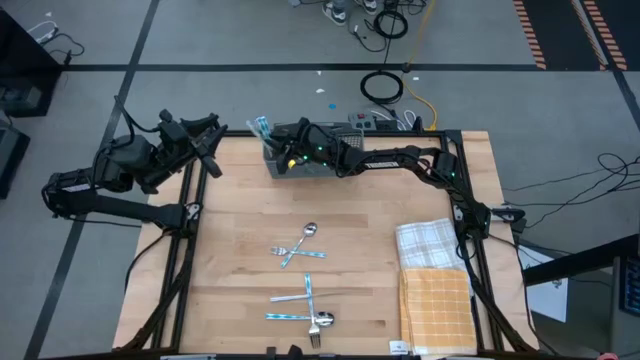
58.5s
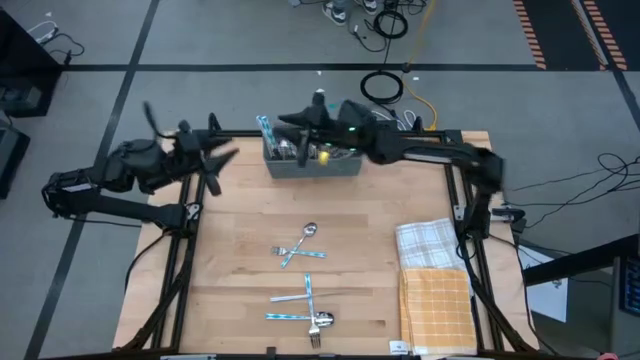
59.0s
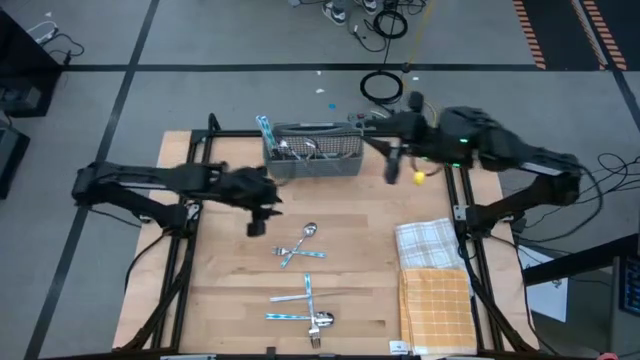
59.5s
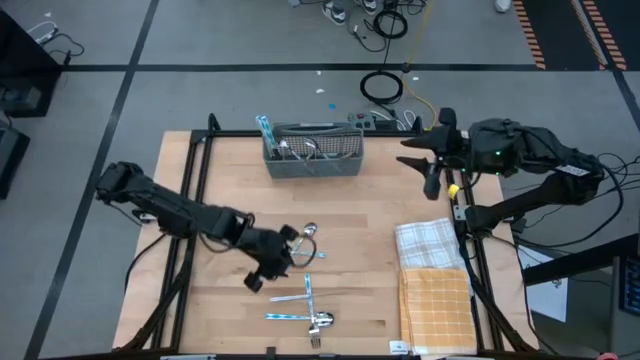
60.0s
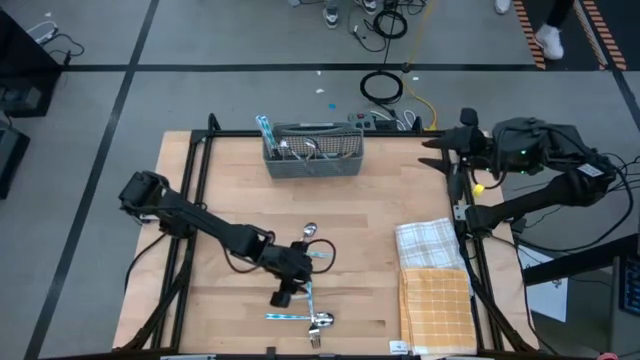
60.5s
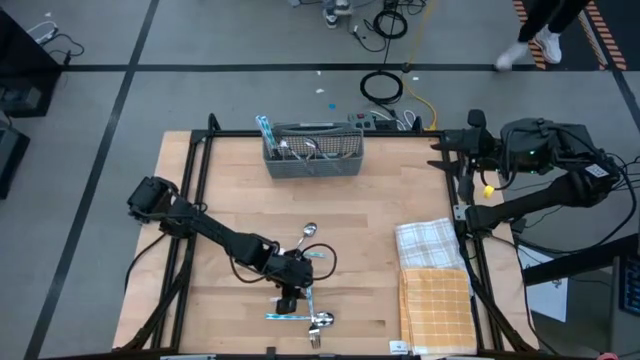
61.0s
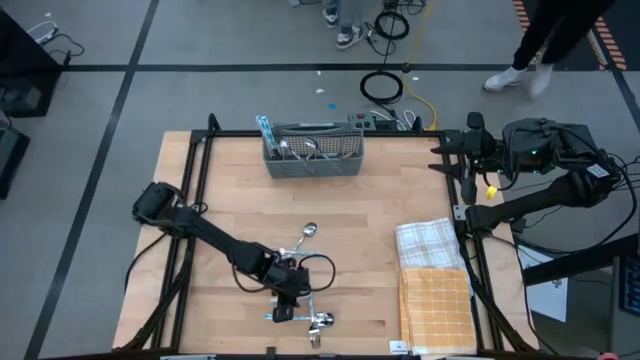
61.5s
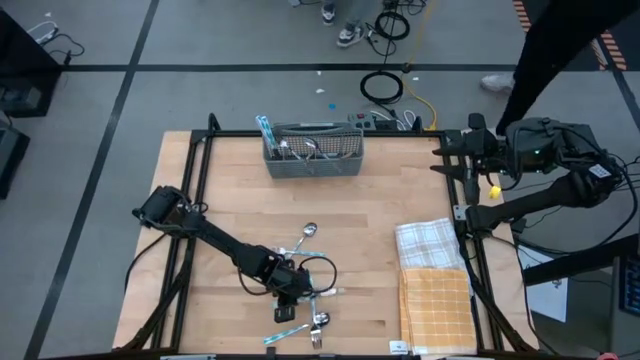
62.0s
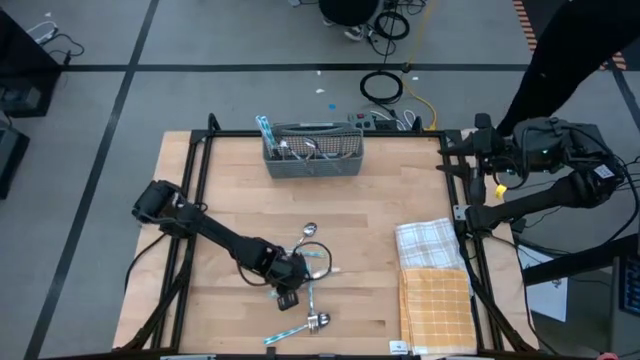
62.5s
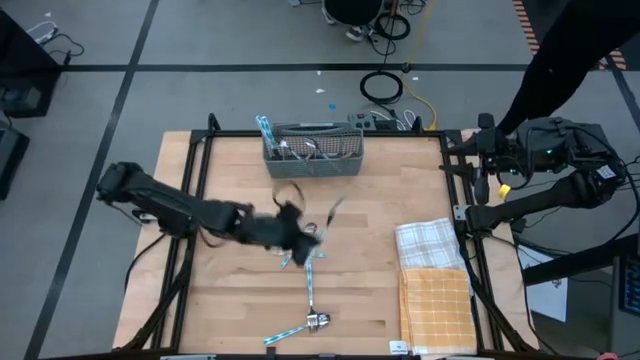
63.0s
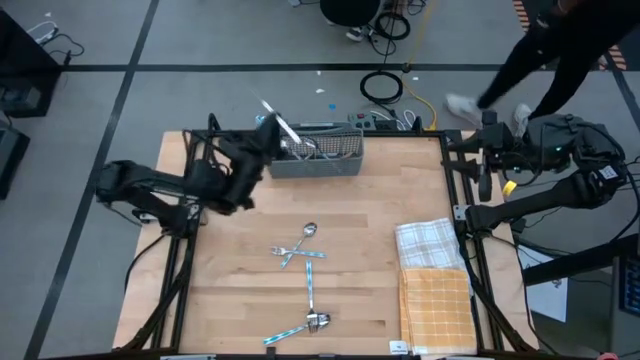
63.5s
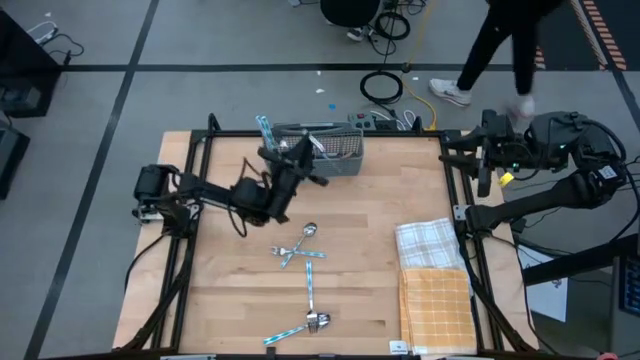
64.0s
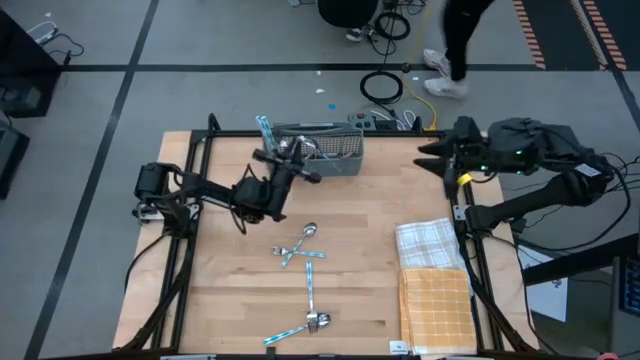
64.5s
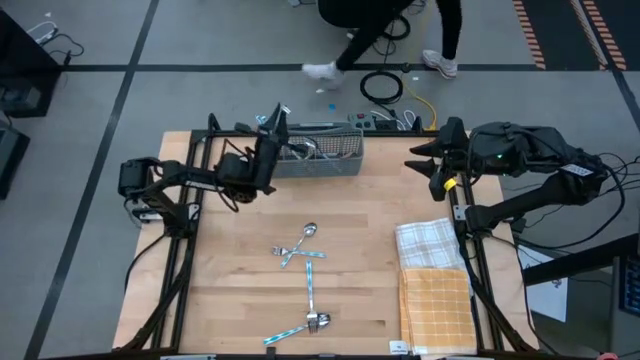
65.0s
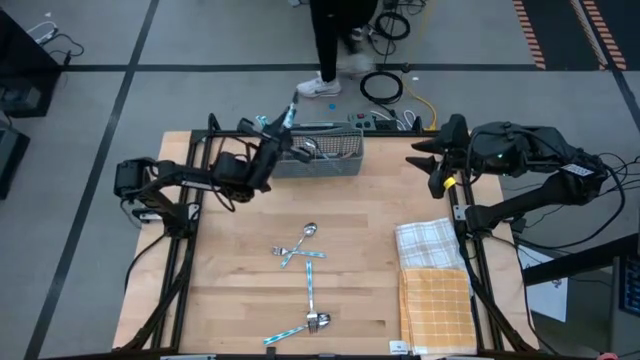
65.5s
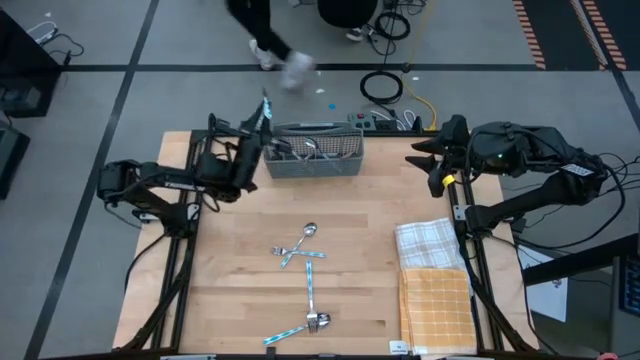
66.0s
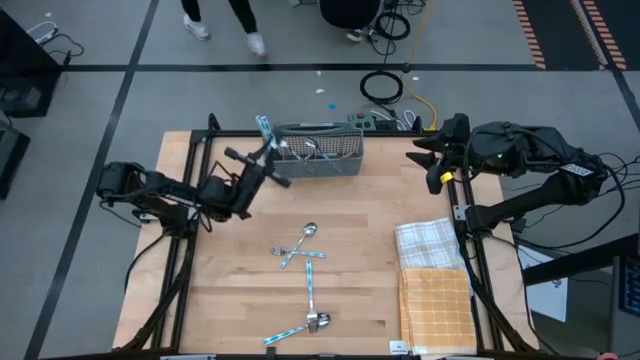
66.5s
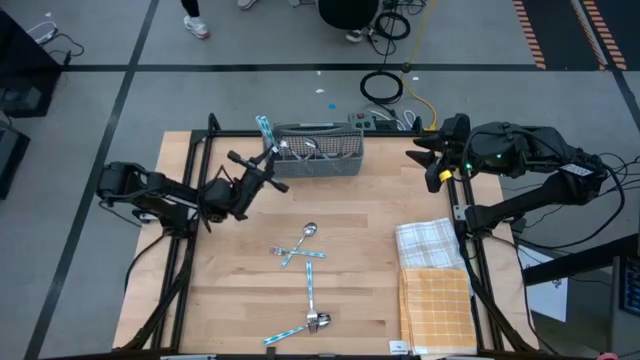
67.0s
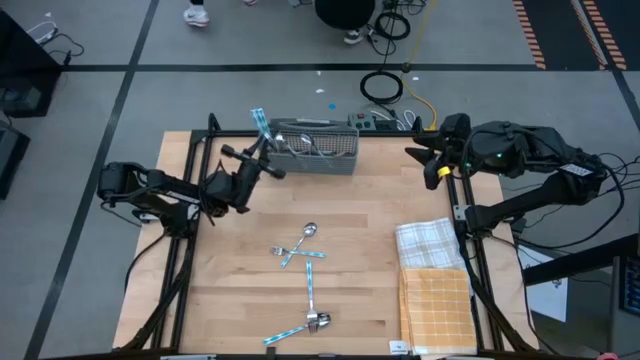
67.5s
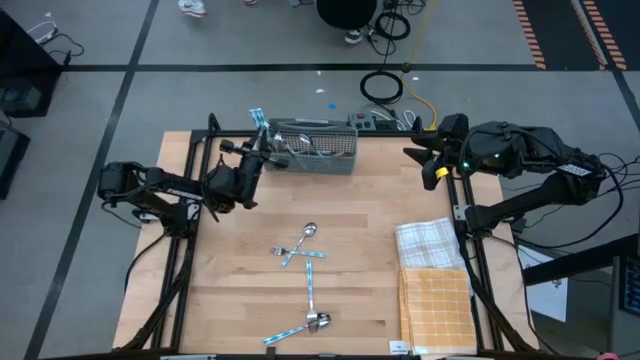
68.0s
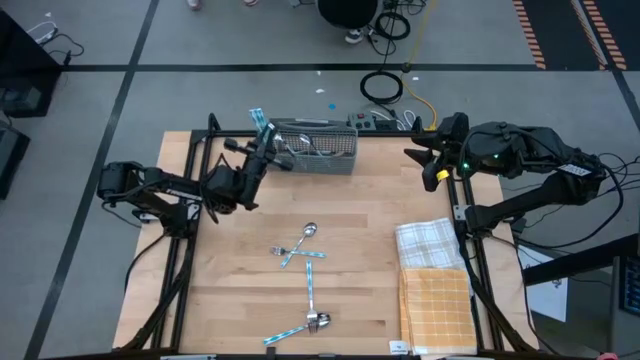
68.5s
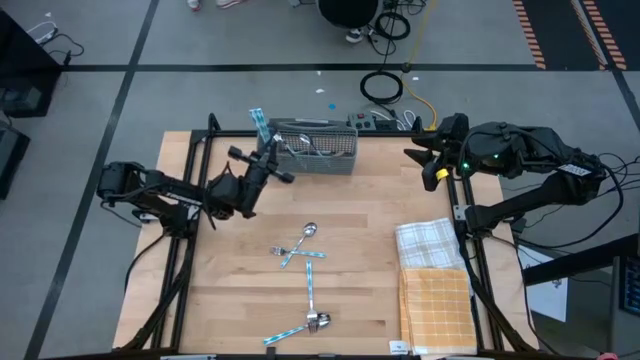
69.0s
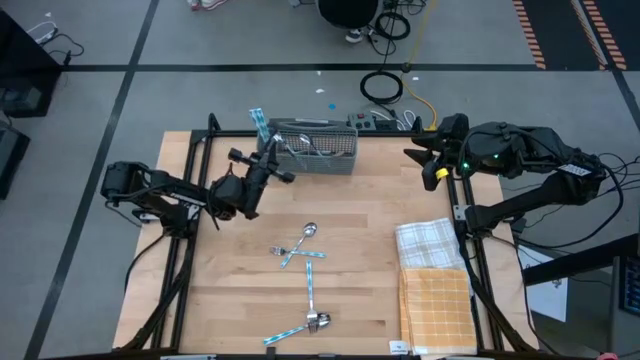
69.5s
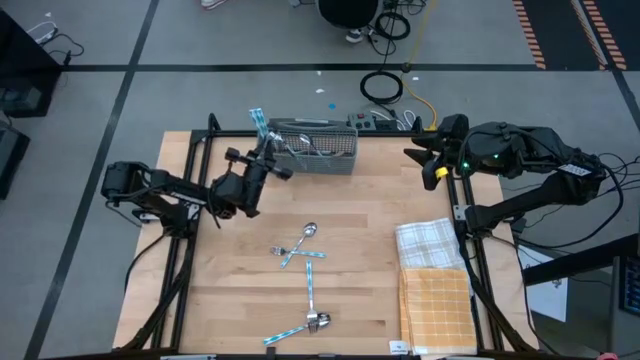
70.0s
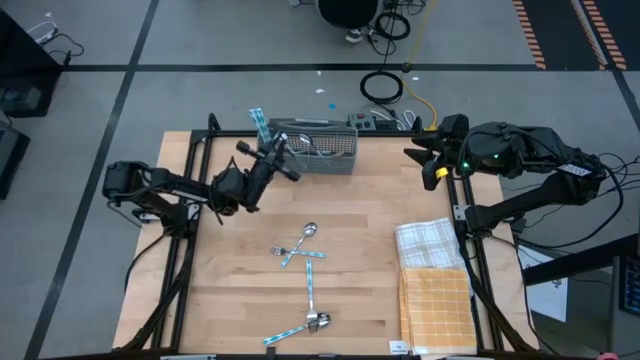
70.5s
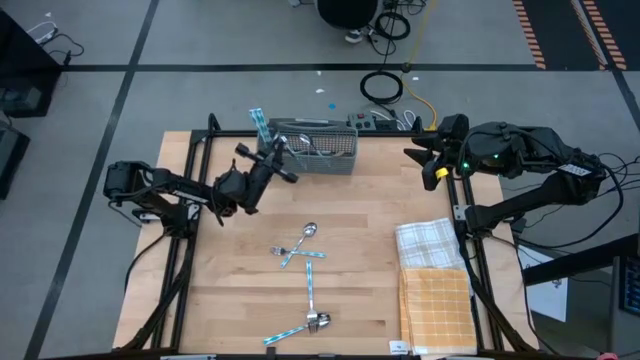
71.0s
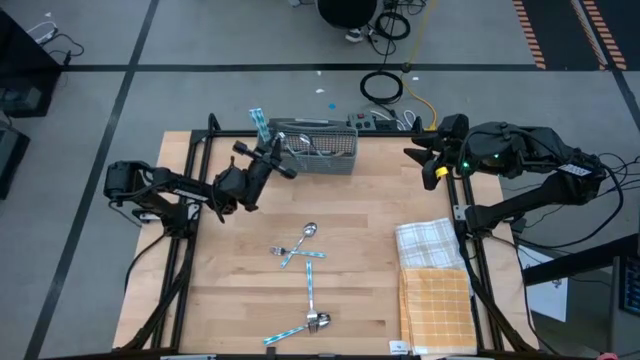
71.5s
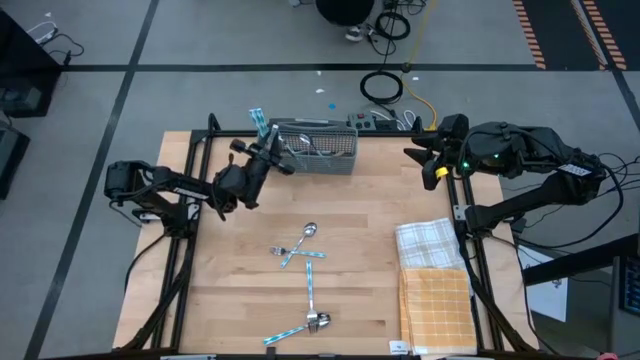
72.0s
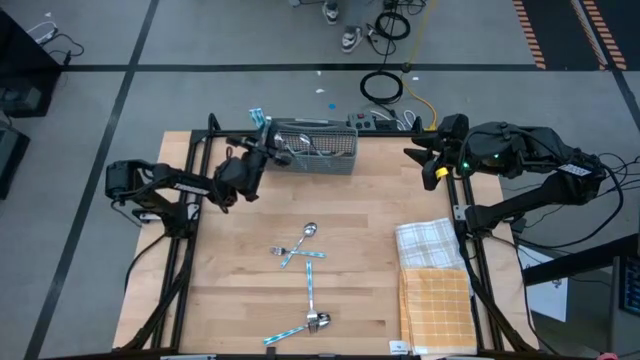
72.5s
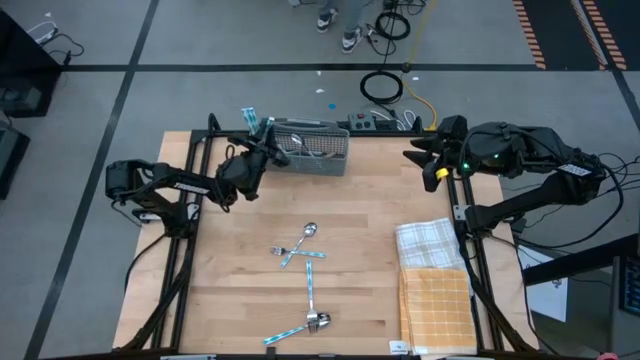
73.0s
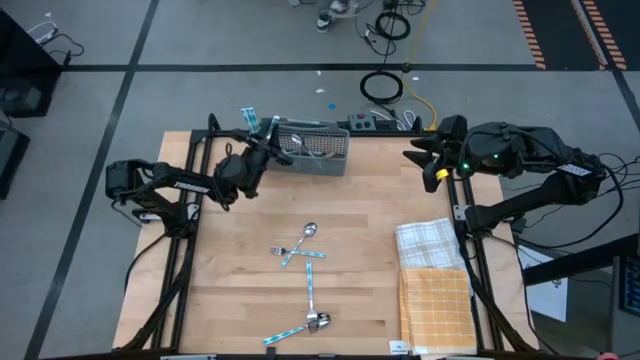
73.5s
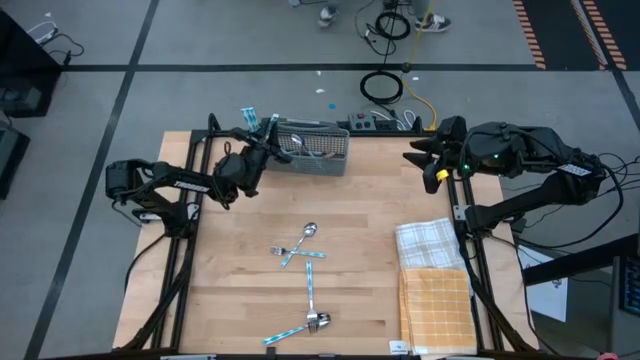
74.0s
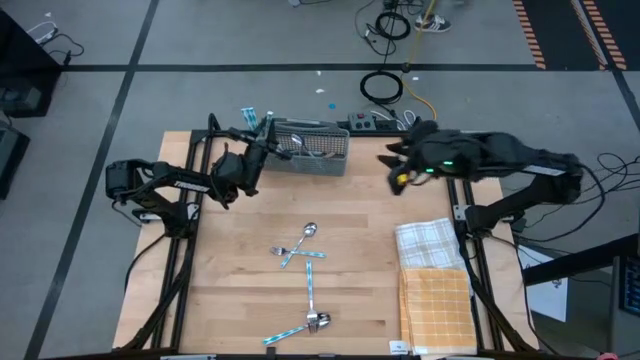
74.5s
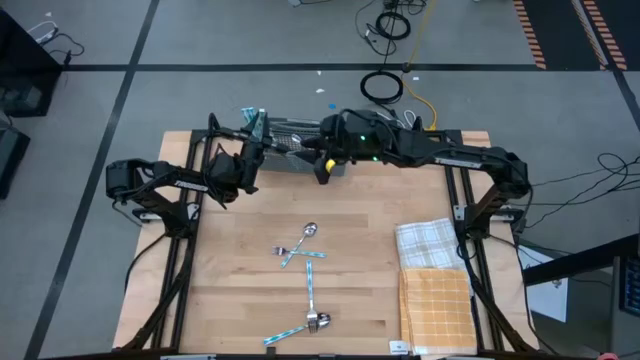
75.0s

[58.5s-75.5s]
Task: Sort silverware
Put the knife into the left section of the utensil holder

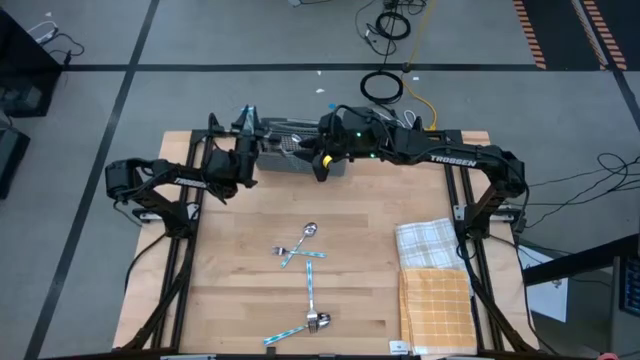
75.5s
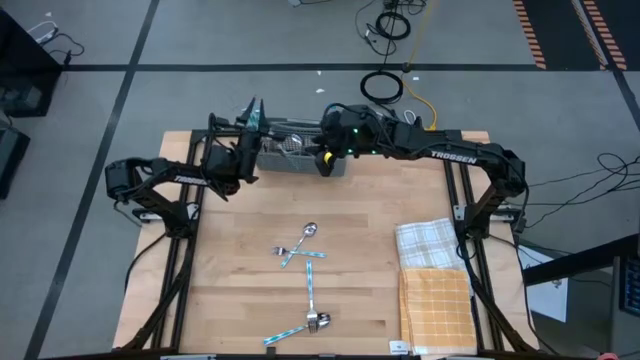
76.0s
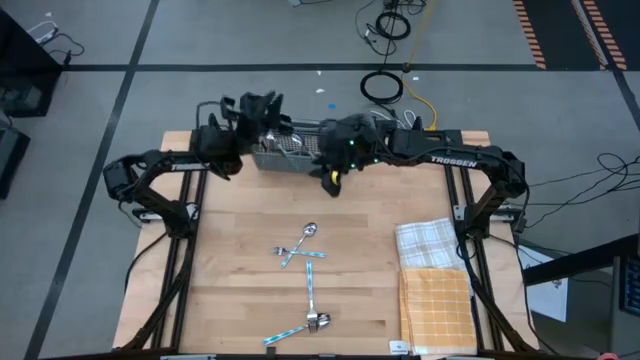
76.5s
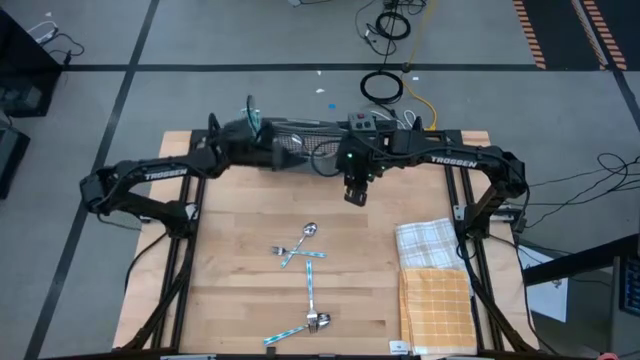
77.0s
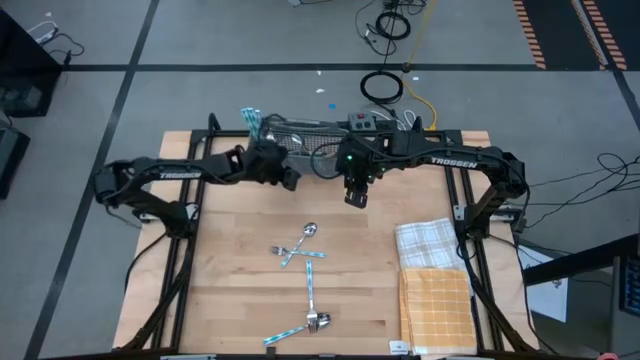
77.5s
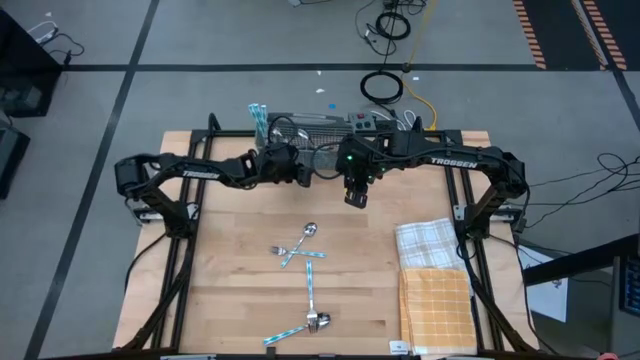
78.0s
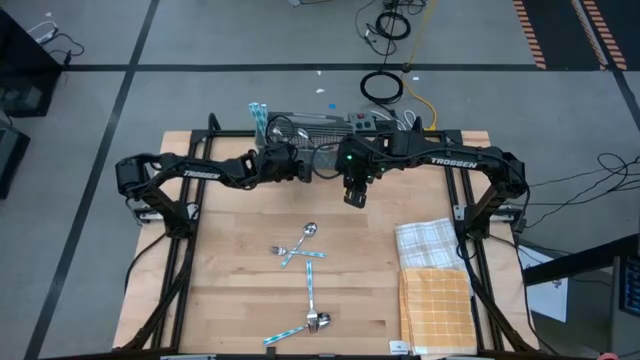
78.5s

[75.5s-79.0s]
Adjust the utensil holder

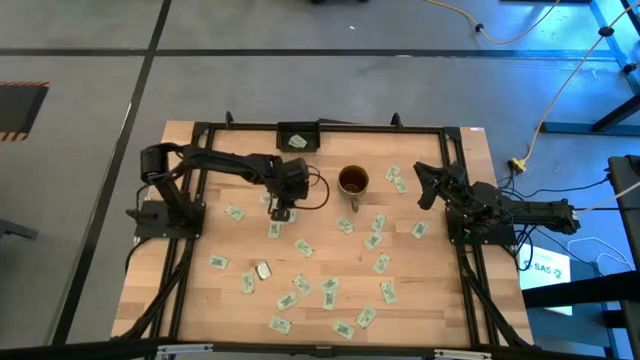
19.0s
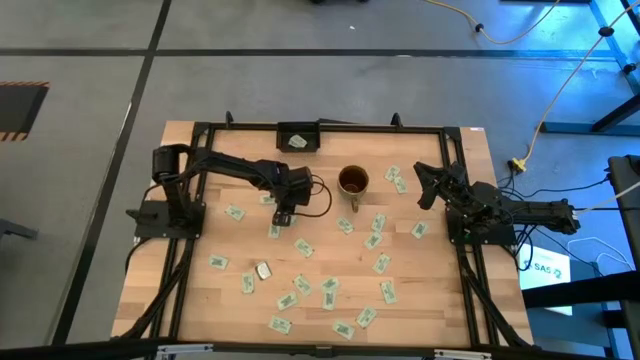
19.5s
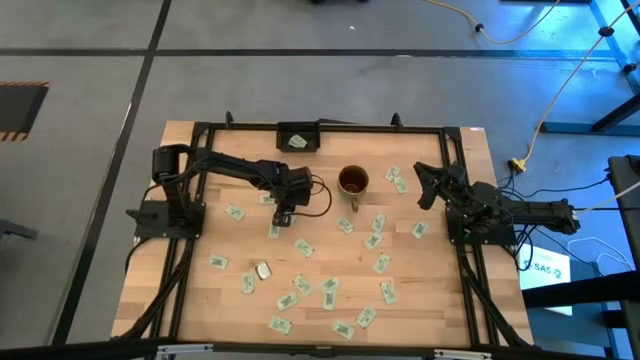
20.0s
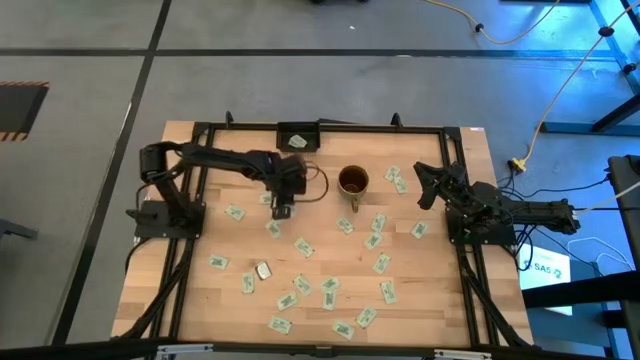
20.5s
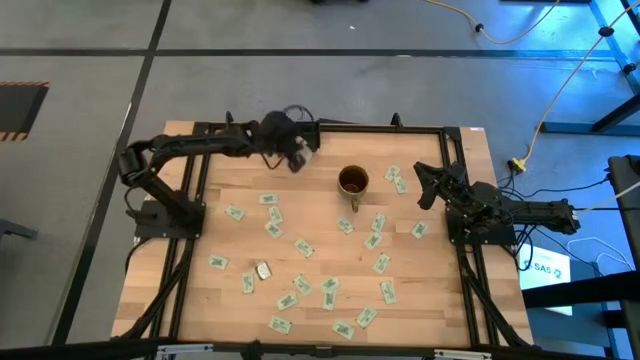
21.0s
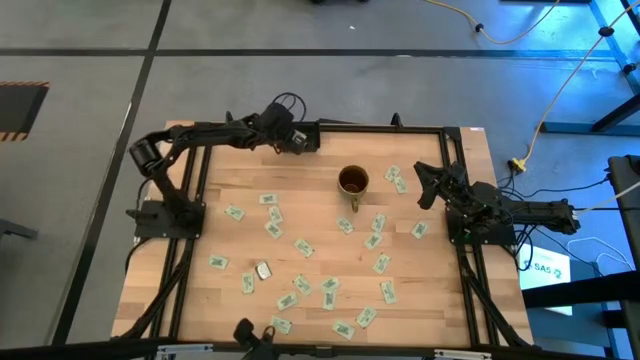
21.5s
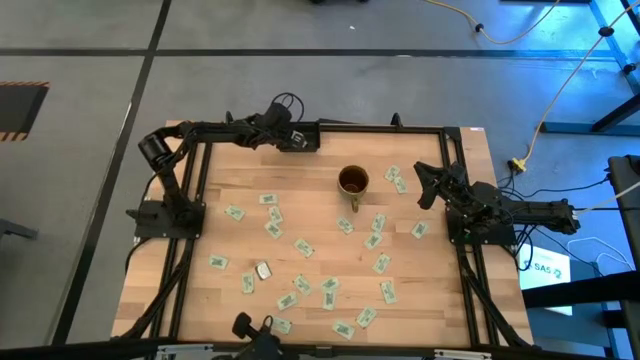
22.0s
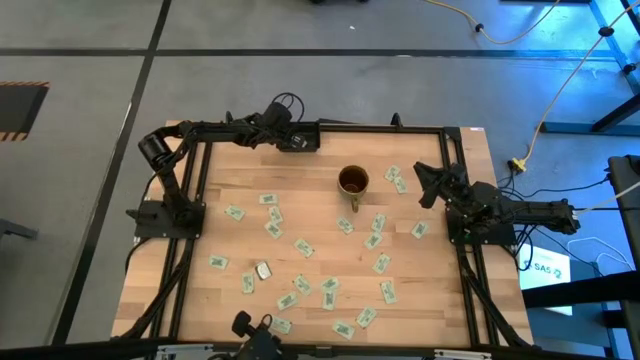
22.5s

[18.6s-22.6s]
Task: Pick and place Stevia / Truvia into bins
Put the stevia packet into the black container
